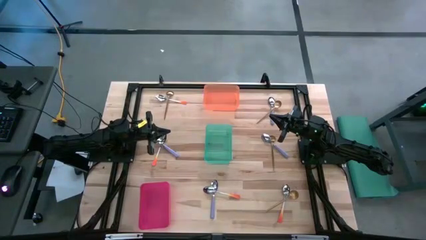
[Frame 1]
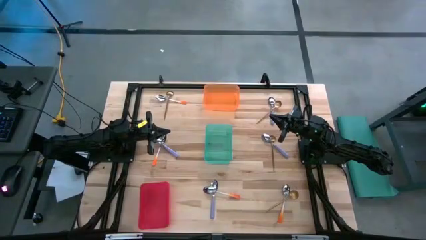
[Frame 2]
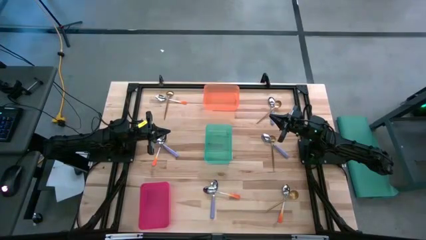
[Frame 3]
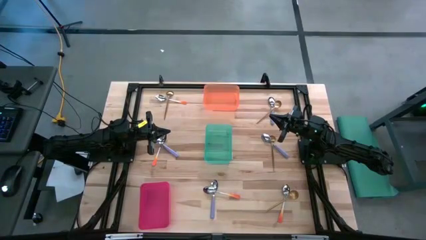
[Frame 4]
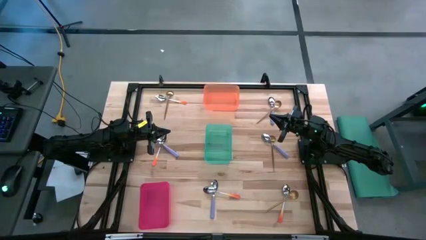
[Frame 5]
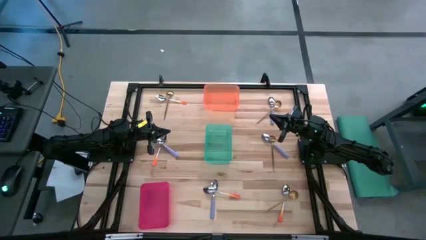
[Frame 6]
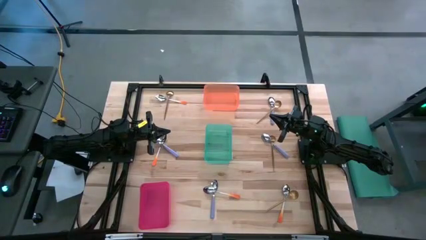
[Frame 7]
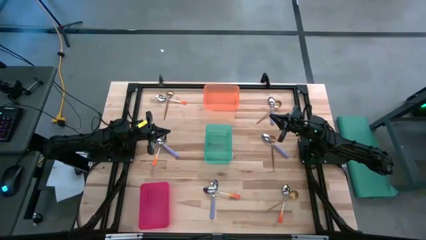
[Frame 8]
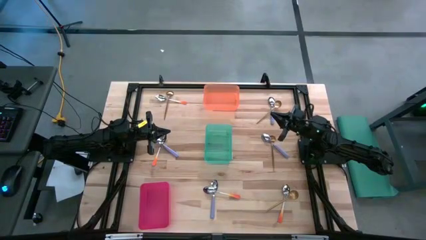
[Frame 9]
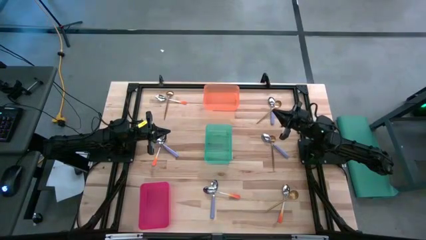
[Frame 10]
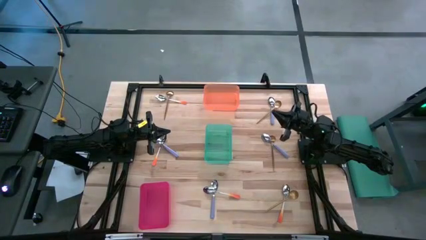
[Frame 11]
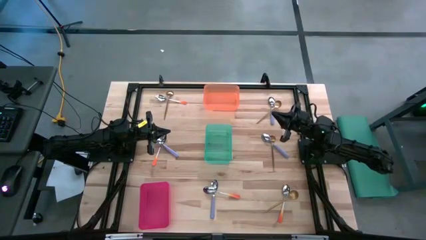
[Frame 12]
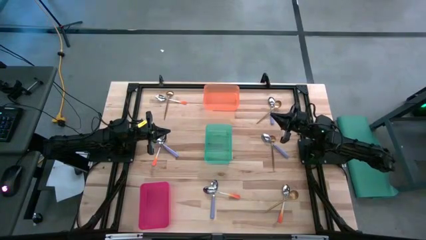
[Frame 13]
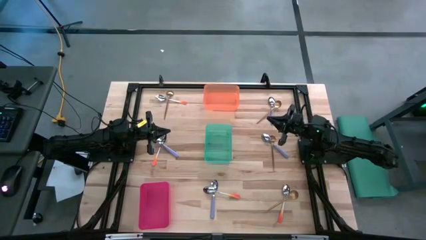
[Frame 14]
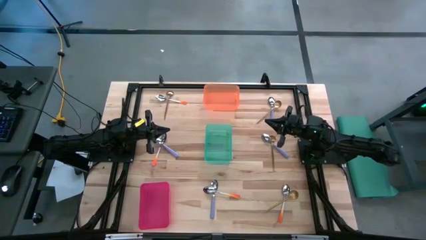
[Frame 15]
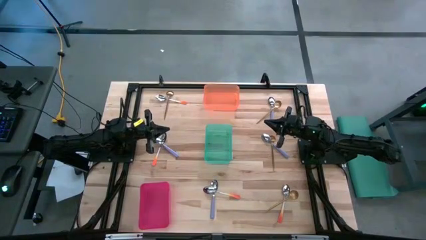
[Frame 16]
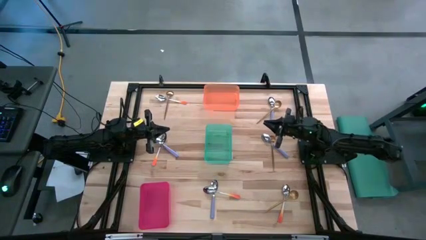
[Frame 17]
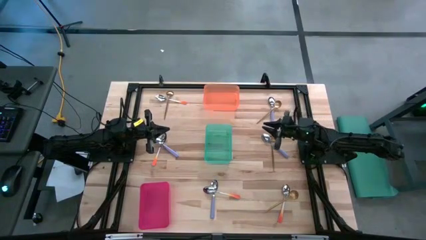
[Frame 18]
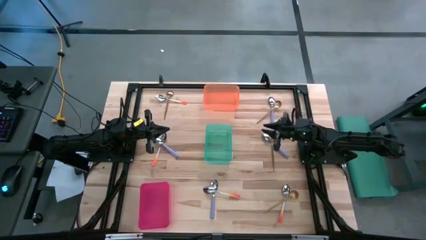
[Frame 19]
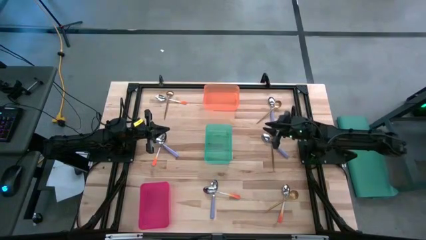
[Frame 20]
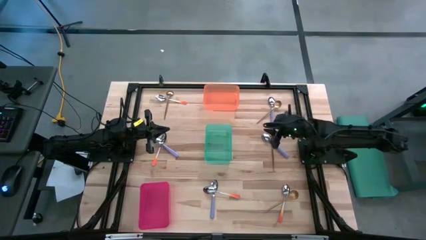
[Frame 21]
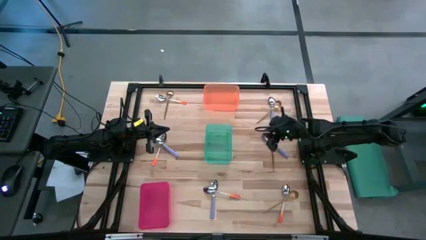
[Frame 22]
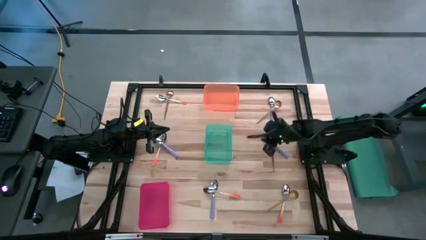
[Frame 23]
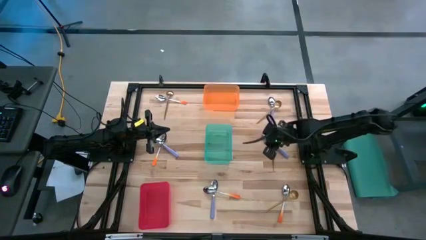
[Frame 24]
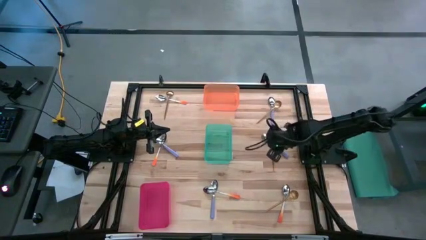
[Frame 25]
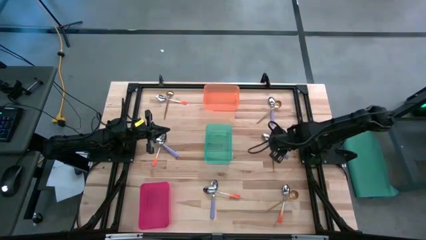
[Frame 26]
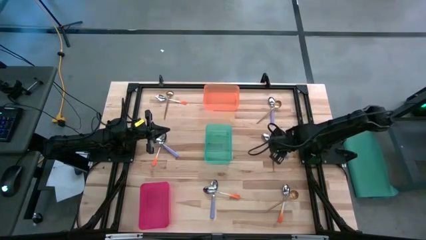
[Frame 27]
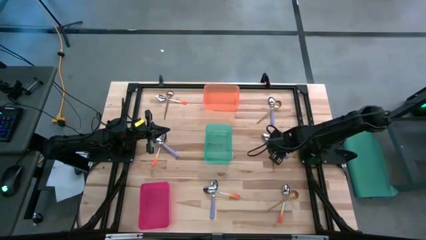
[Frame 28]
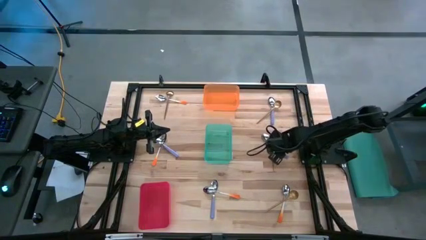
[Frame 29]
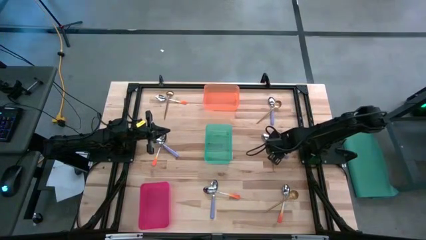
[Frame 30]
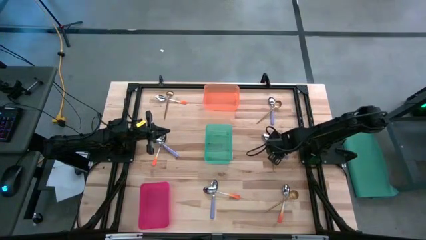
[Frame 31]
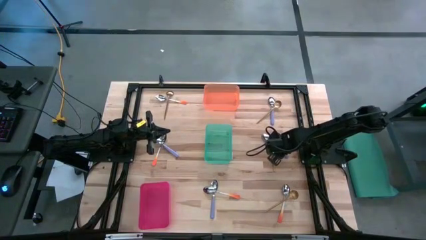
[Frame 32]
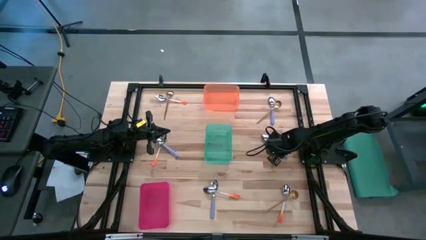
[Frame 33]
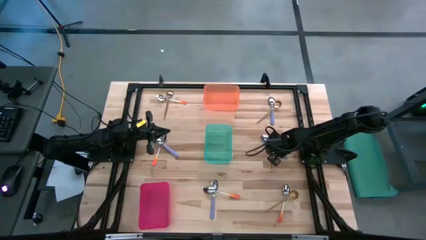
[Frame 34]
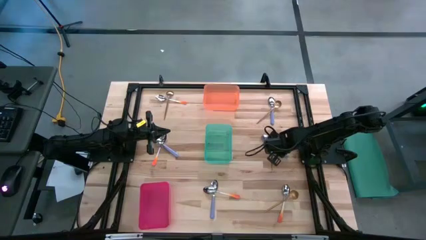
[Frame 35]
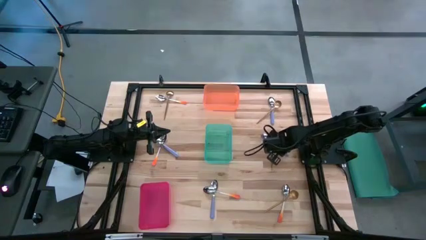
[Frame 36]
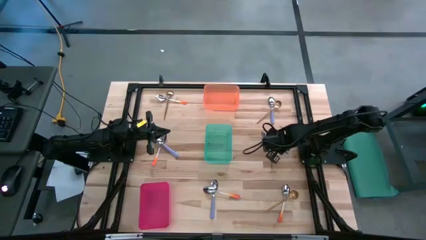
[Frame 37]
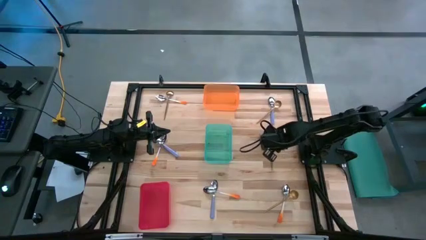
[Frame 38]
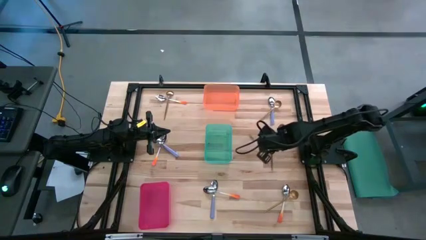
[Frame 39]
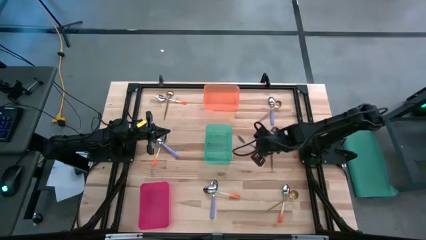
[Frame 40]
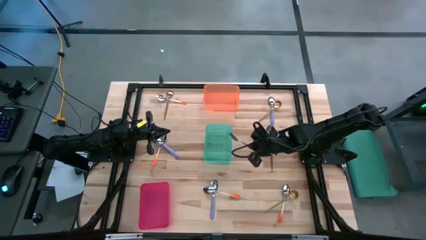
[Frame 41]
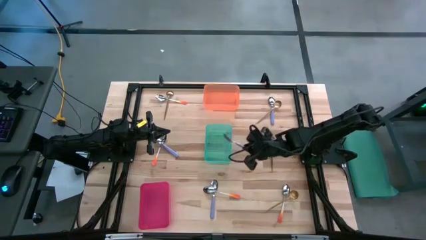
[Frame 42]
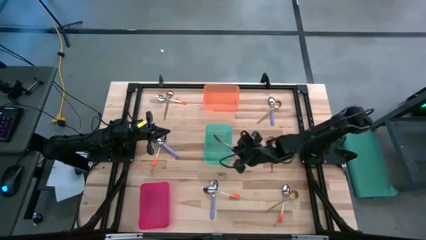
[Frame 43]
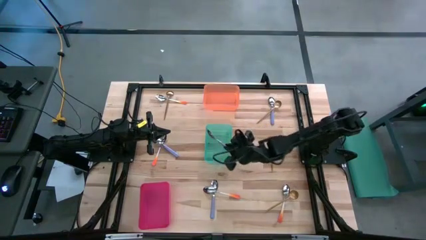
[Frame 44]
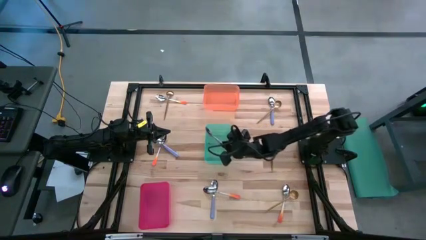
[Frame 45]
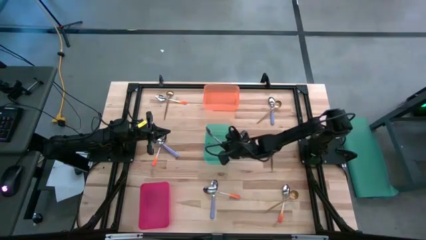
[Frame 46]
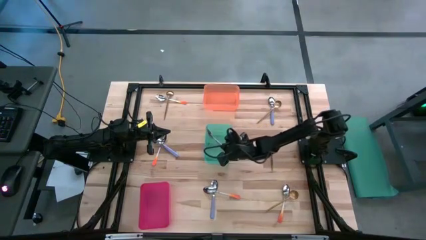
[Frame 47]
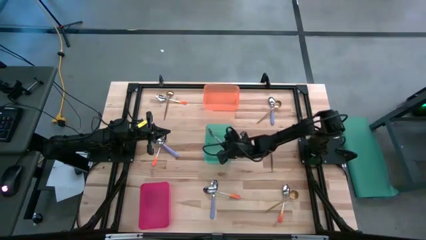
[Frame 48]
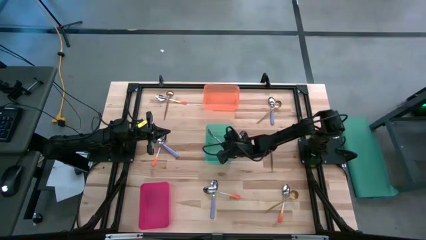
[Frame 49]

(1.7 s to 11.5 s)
Task: Sort silverware by color (type)
Put the purple spoon into the green bin
